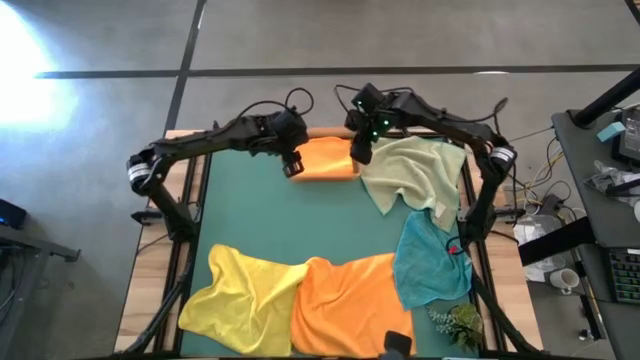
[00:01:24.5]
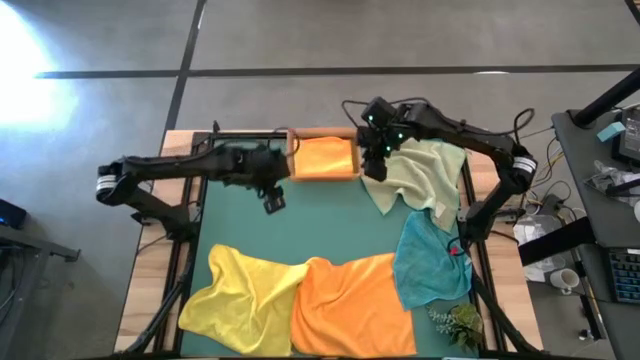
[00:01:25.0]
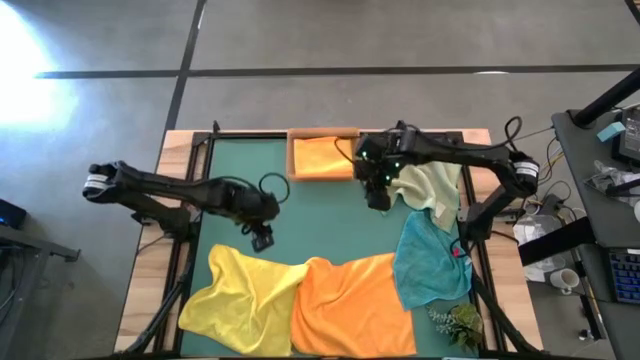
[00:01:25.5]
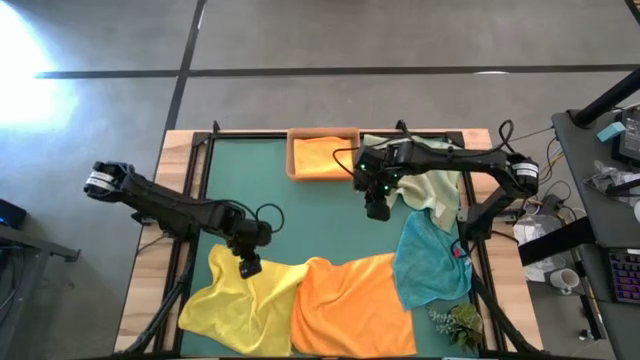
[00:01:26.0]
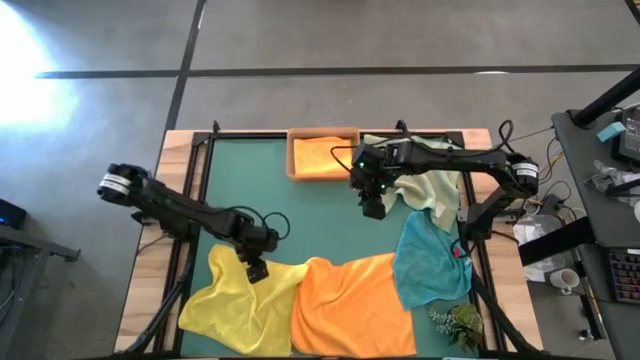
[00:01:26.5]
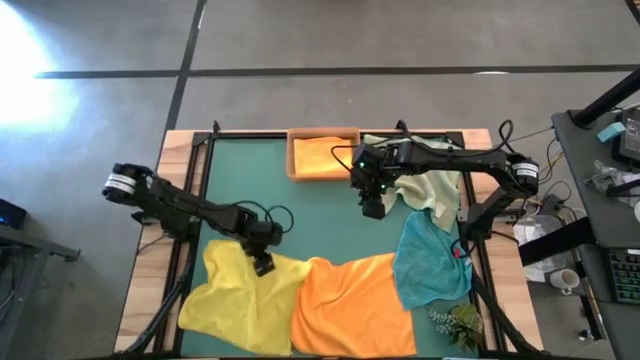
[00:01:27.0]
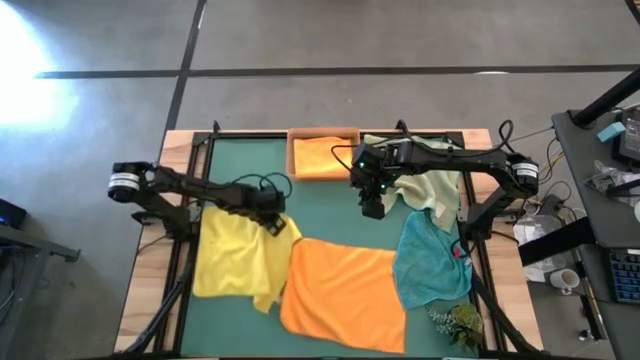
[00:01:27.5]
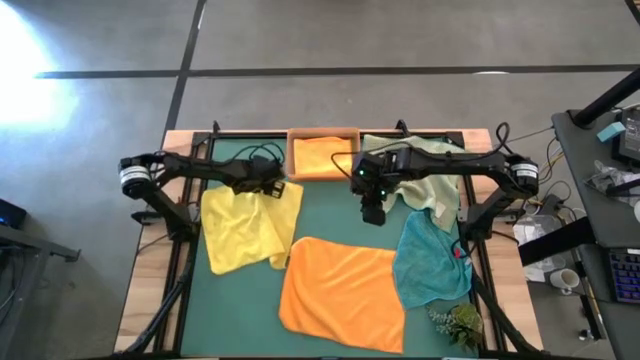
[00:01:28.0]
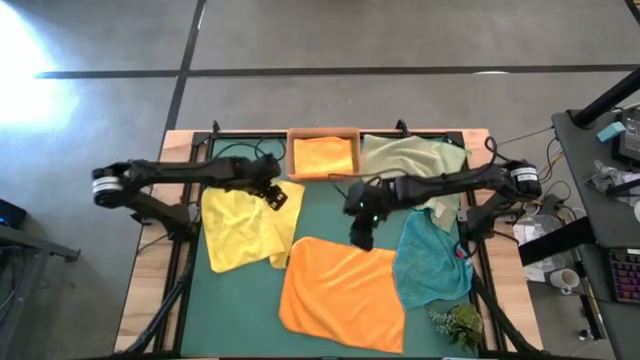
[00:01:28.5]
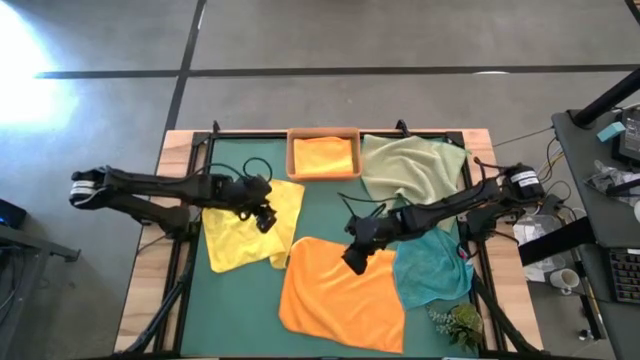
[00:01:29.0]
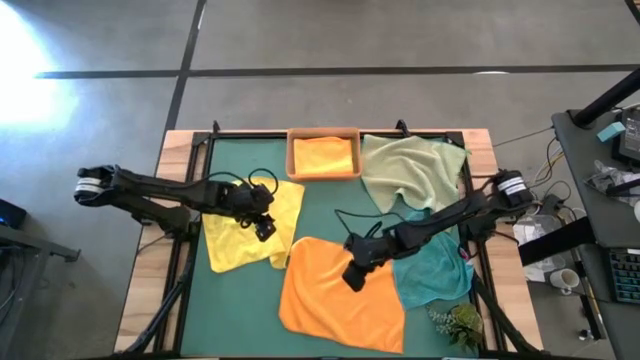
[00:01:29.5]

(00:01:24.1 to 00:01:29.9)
Task: Fold microfiber towels
Move the yellow towel to the center left of the table

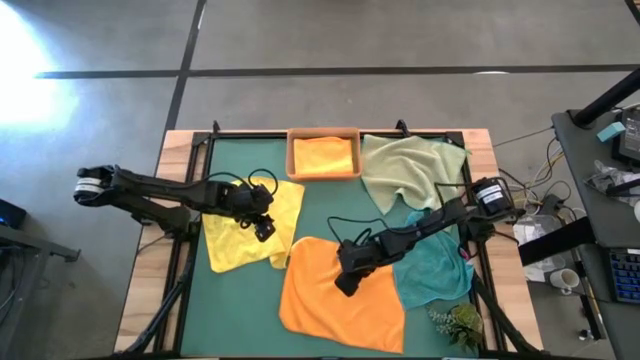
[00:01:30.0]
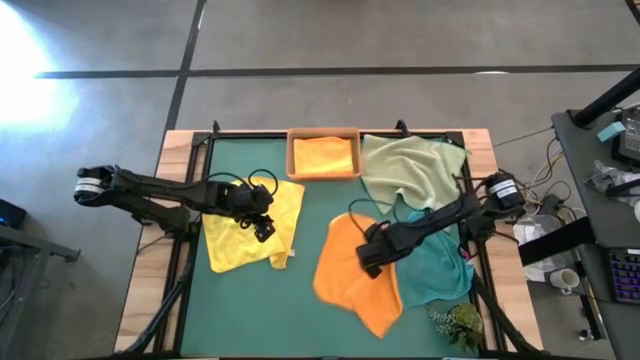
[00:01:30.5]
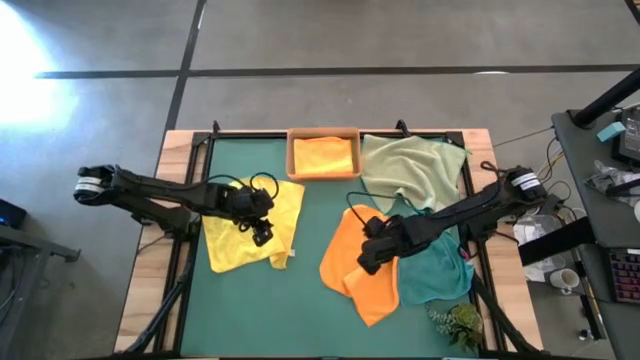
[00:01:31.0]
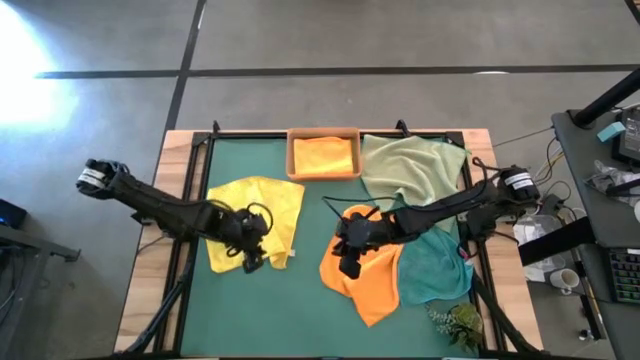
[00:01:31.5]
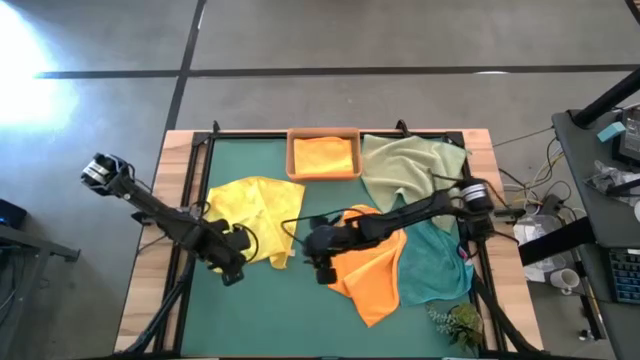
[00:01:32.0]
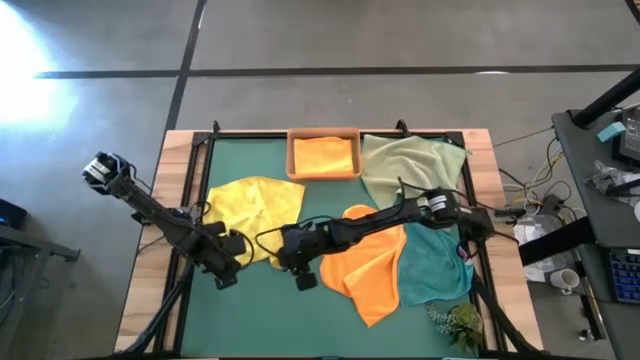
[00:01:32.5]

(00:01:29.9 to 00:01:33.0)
Move the orange towel to the center of the table

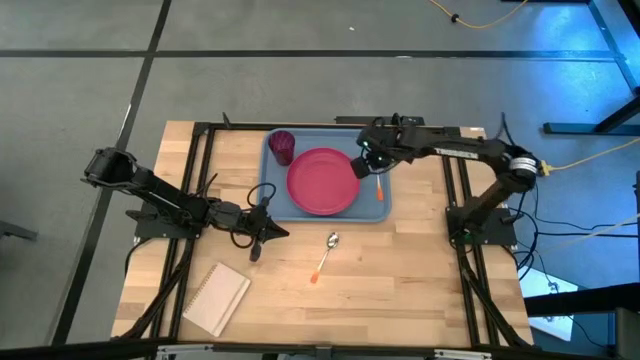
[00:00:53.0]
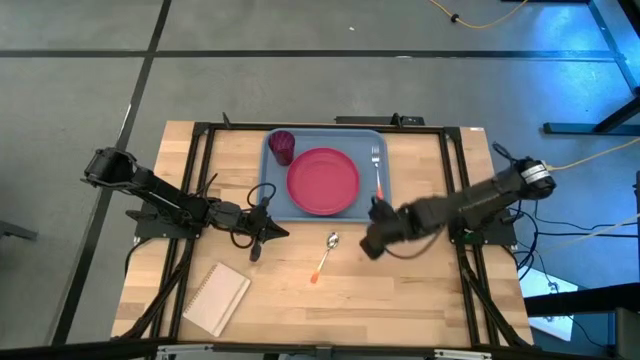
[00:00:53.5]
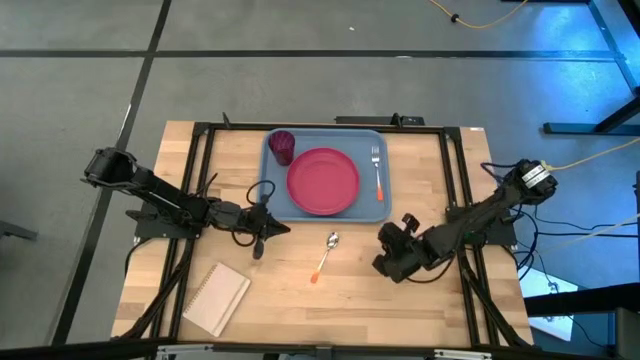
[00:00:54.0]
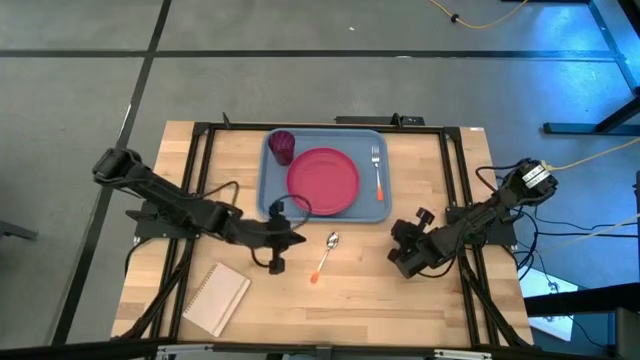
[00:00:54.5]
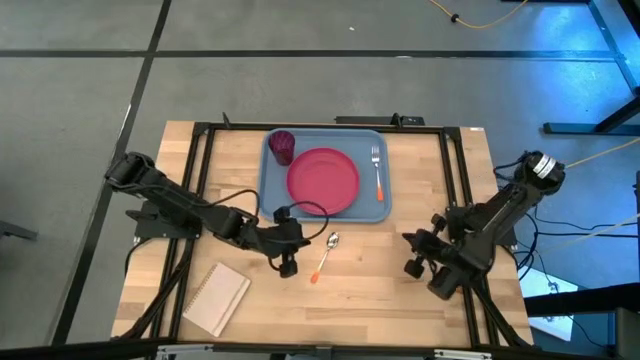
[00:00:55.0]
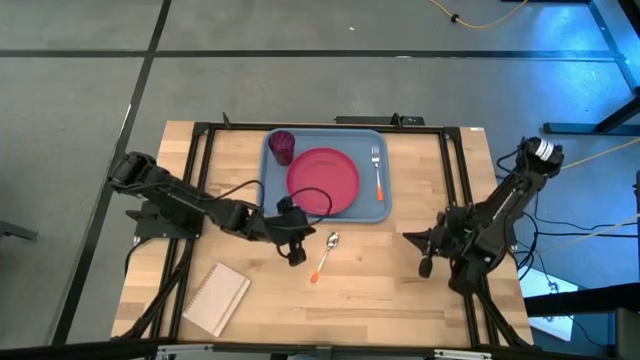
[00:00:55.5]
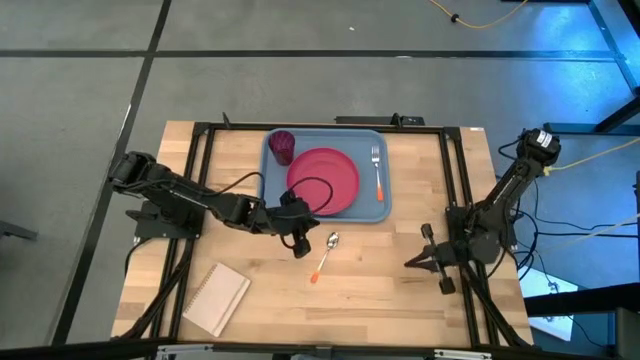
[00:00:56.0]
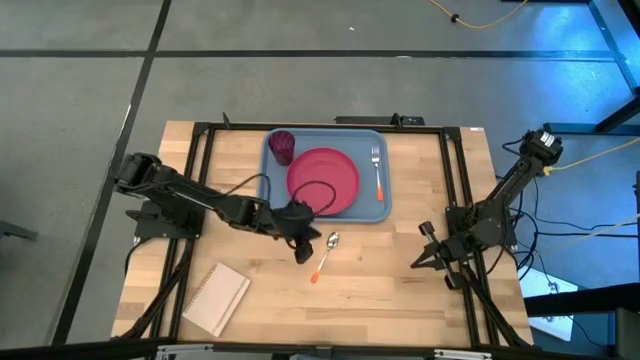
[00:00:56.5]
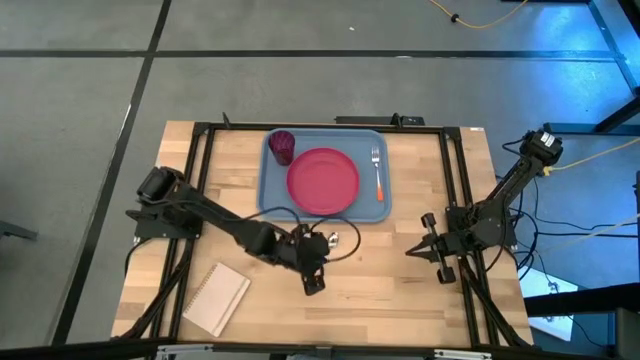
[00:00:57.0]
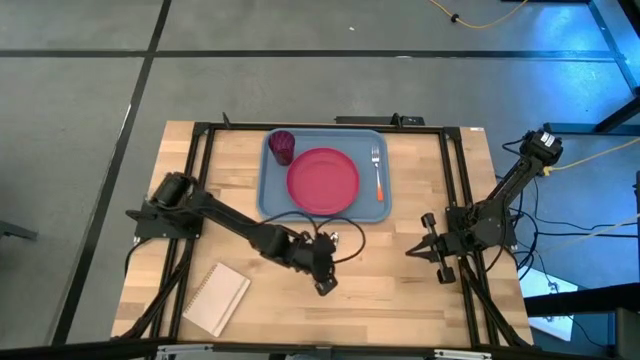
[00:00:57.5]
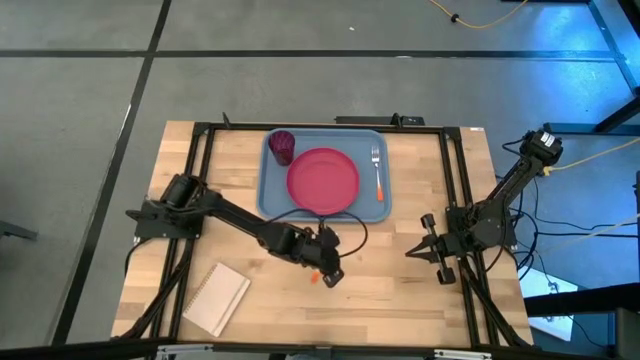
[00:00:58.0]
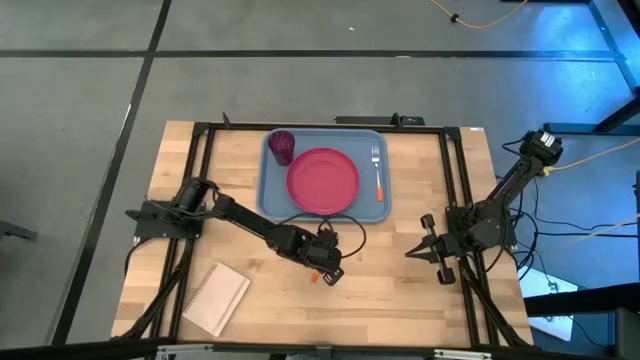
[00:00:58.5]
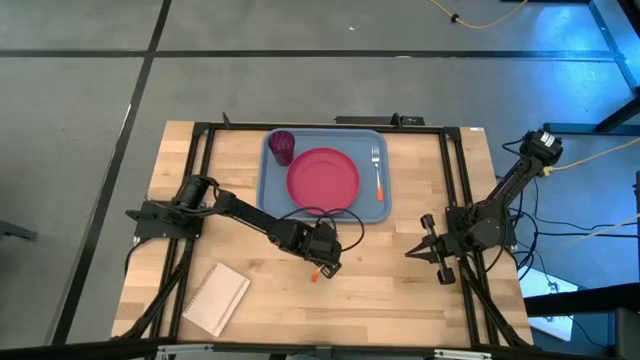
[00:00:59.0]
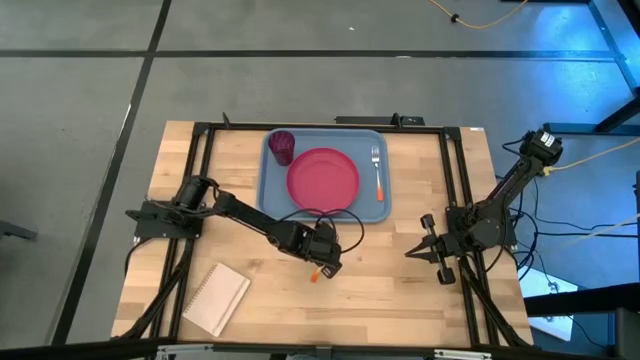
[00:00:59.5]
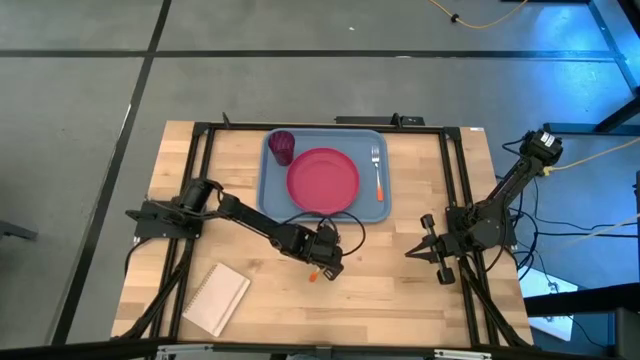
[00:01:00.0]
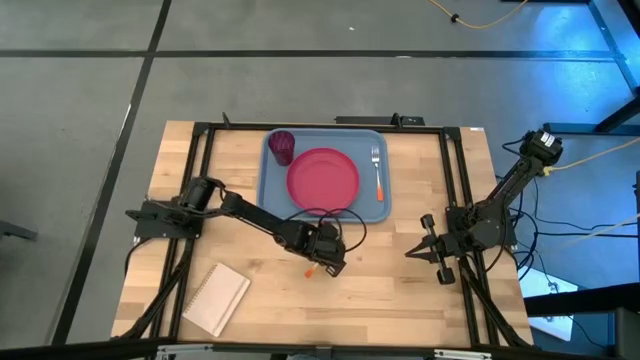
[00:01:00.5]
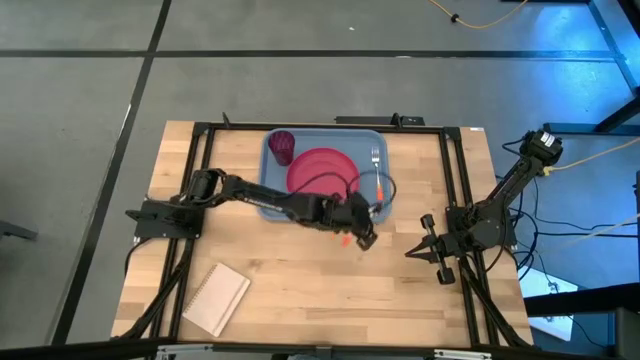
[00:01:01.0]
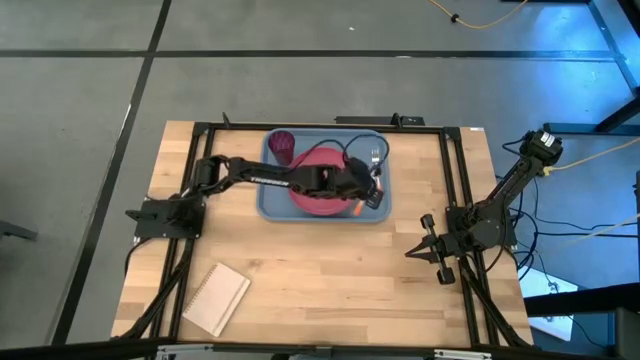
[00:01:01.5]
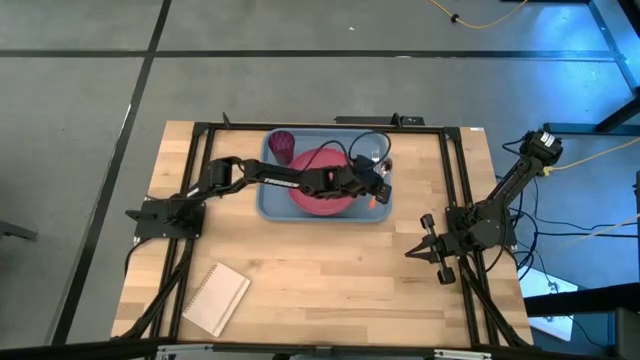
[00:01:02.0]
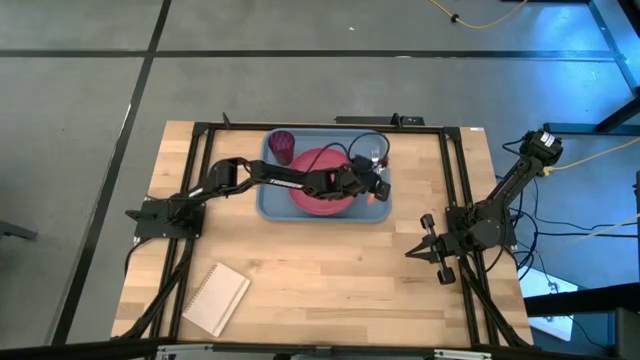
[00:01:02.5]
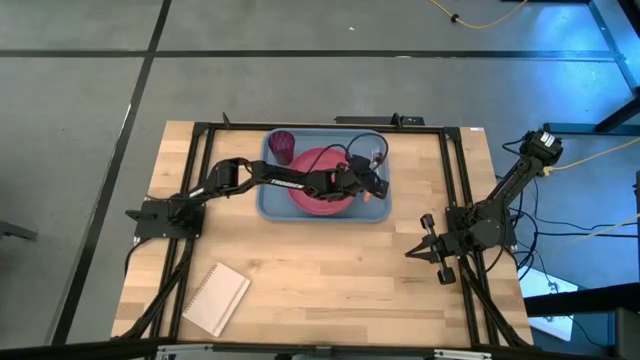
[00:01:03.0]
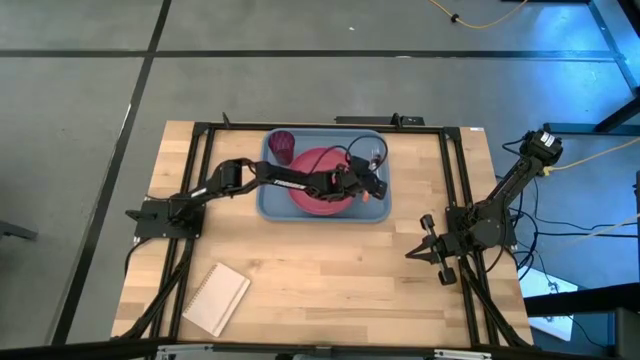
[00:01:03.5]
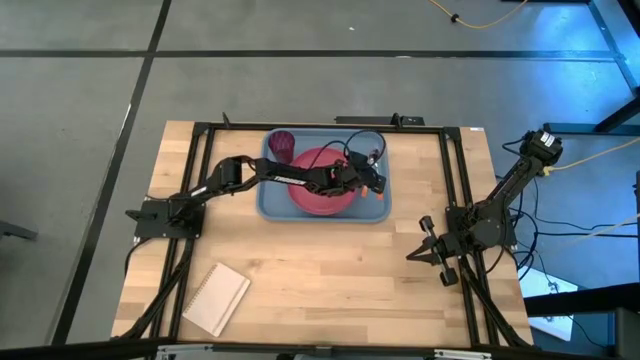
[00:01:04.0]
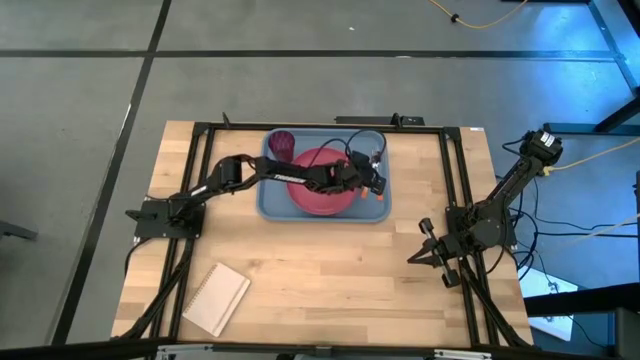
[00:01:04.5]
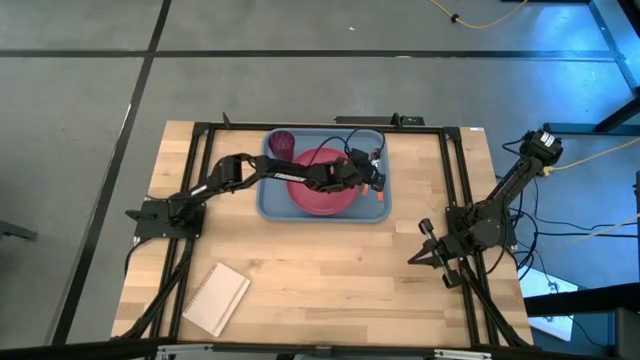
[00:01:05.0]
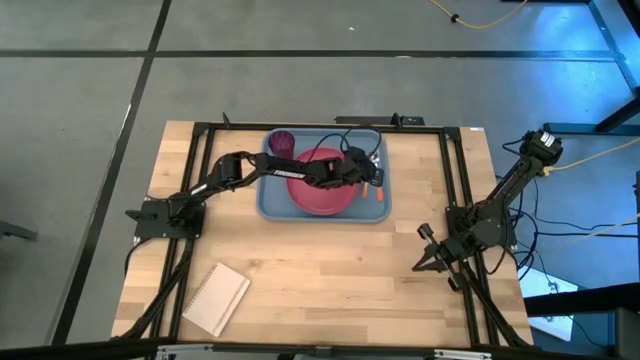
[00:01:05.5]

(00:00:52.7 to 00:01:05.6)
Task: Pick and place plate/cup/fork/spoon on tray
Put the orange spoon on the blue serving tray to the right of the pink plate
